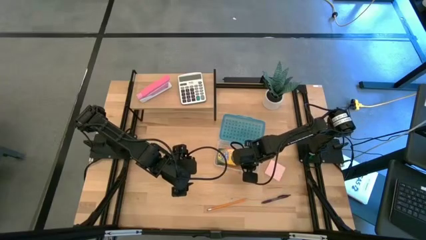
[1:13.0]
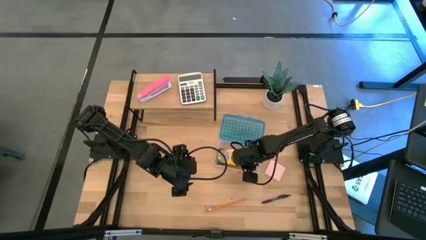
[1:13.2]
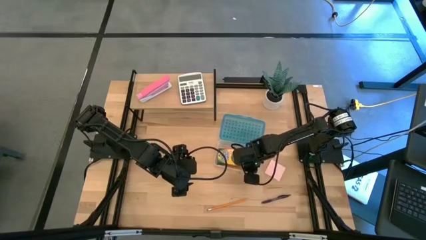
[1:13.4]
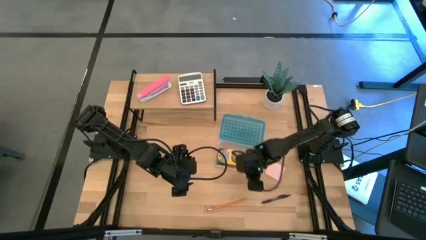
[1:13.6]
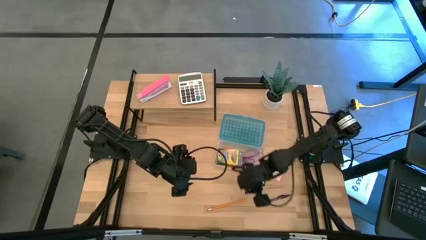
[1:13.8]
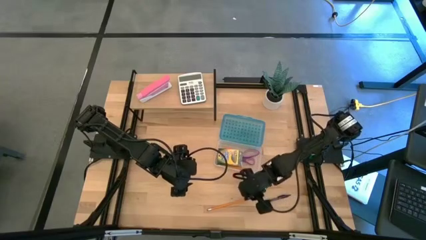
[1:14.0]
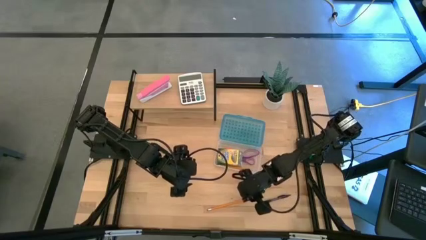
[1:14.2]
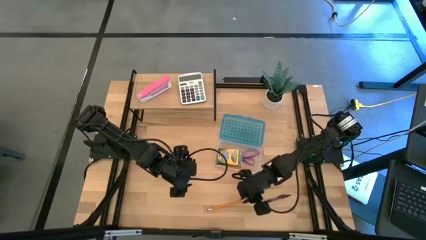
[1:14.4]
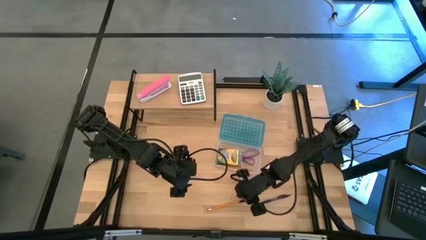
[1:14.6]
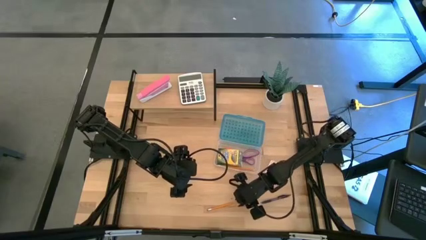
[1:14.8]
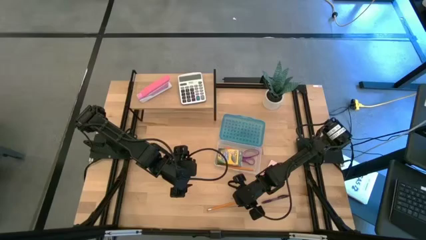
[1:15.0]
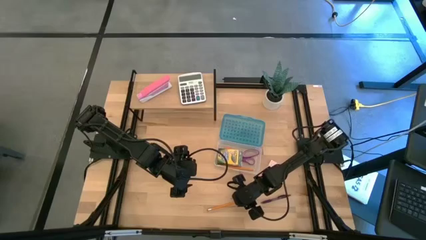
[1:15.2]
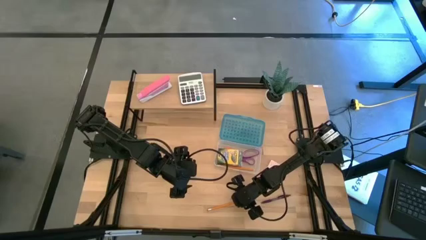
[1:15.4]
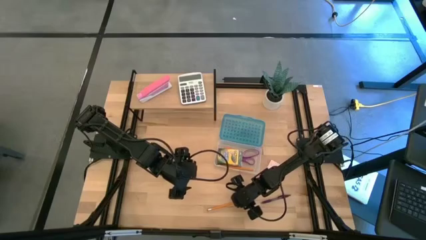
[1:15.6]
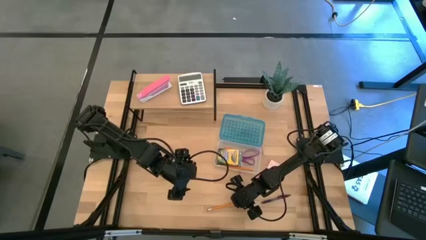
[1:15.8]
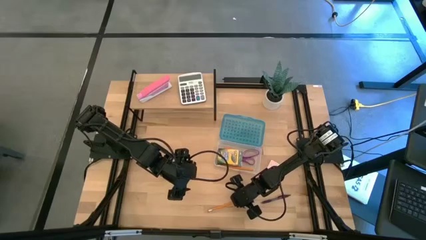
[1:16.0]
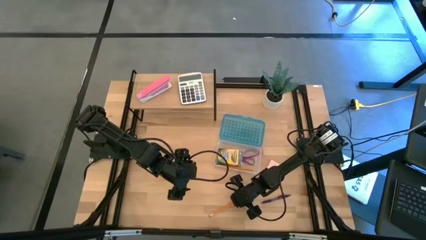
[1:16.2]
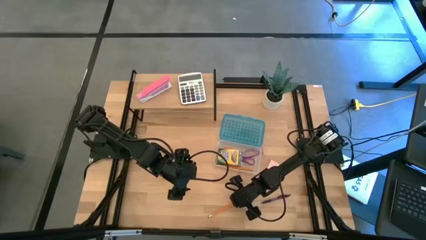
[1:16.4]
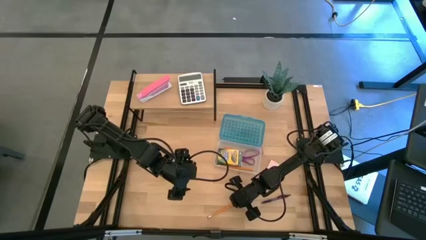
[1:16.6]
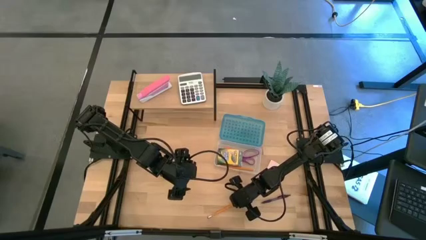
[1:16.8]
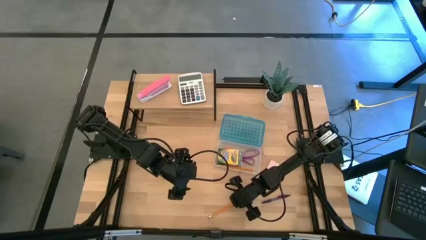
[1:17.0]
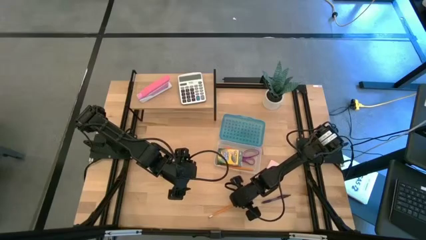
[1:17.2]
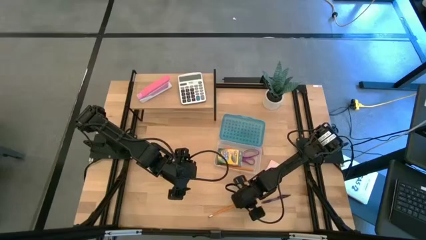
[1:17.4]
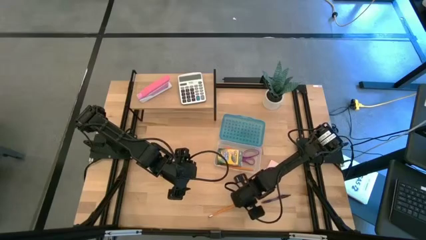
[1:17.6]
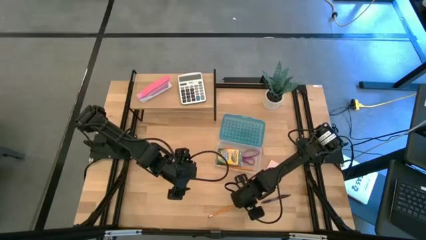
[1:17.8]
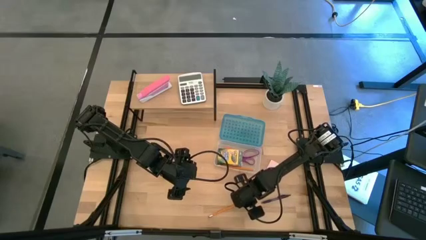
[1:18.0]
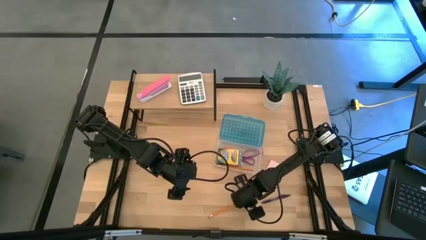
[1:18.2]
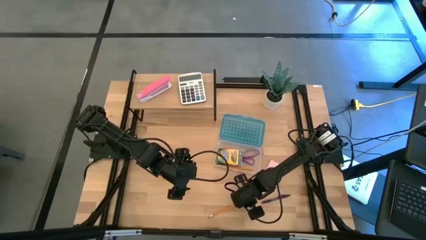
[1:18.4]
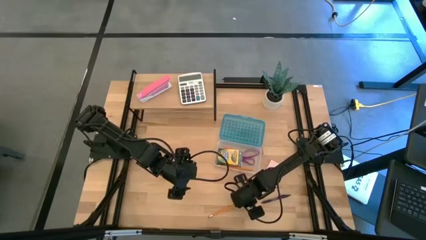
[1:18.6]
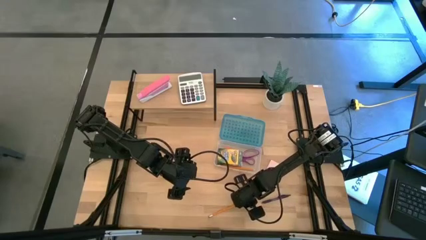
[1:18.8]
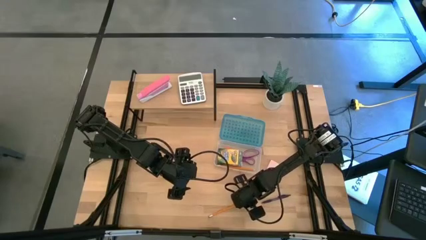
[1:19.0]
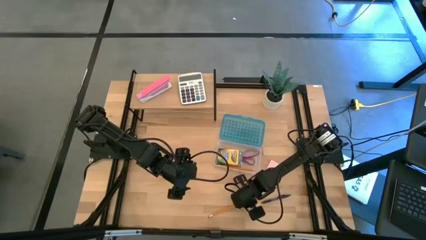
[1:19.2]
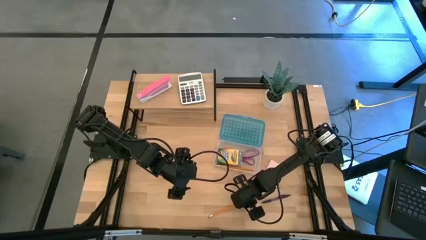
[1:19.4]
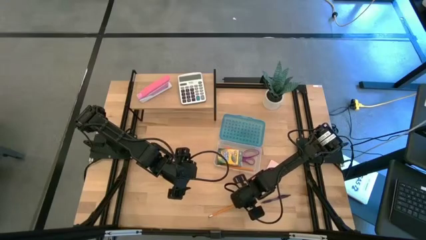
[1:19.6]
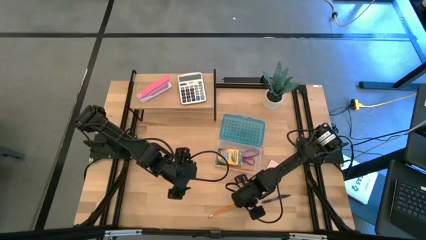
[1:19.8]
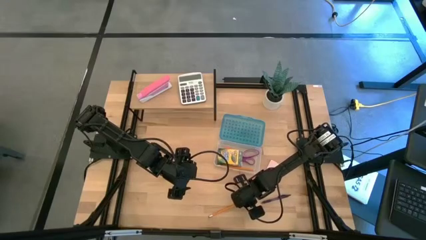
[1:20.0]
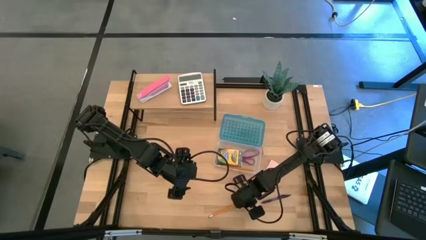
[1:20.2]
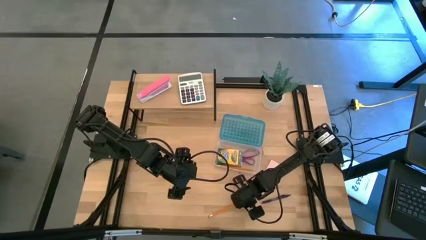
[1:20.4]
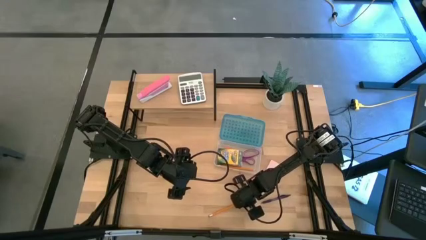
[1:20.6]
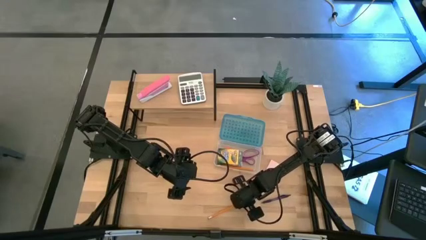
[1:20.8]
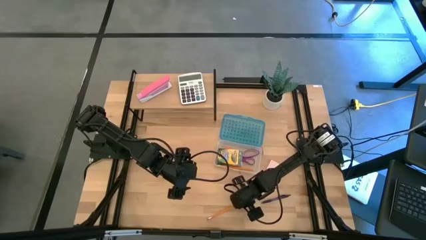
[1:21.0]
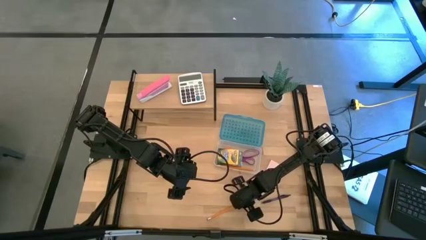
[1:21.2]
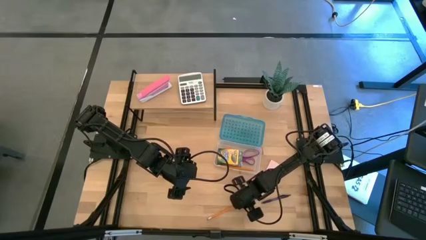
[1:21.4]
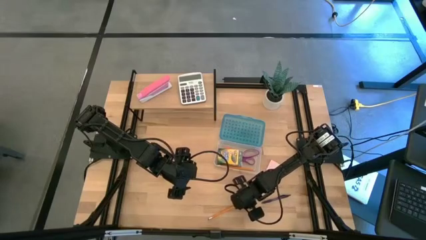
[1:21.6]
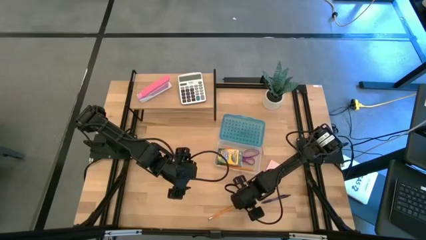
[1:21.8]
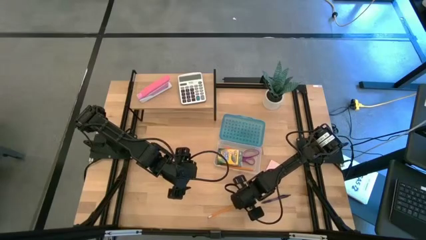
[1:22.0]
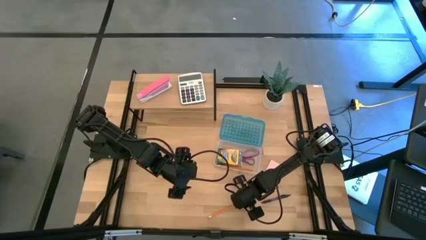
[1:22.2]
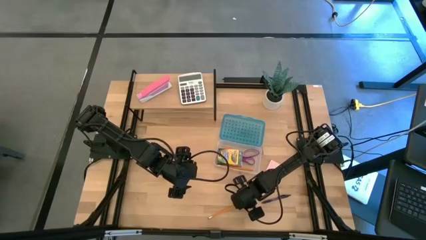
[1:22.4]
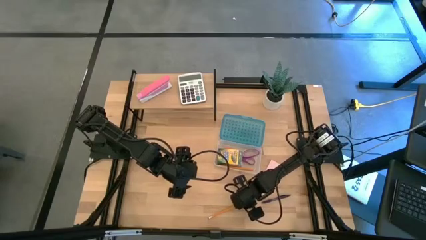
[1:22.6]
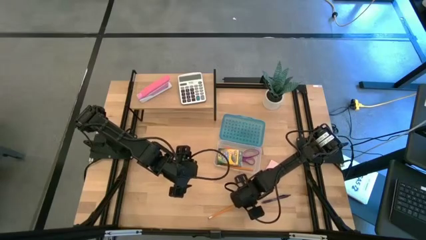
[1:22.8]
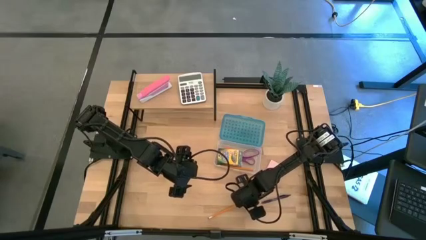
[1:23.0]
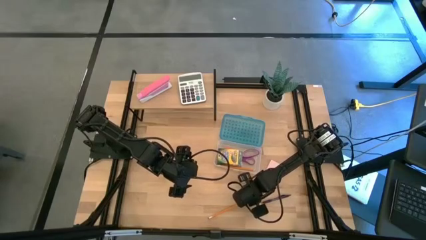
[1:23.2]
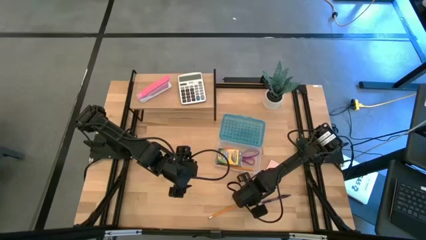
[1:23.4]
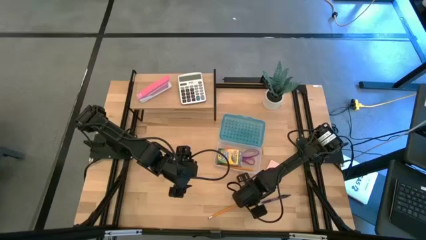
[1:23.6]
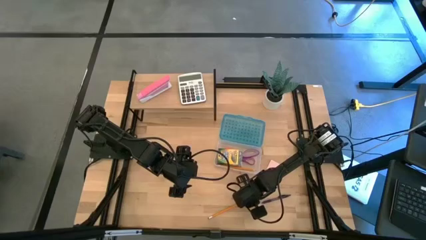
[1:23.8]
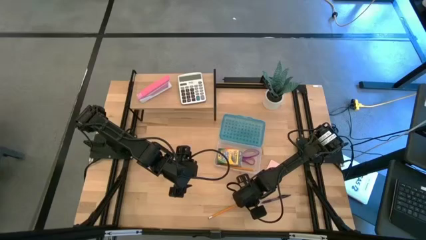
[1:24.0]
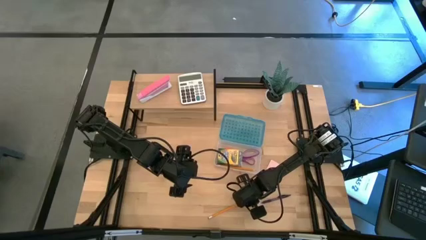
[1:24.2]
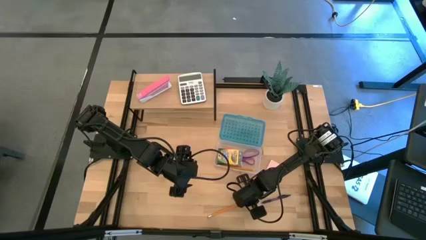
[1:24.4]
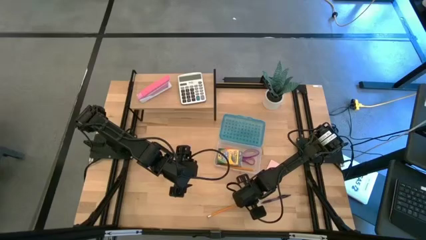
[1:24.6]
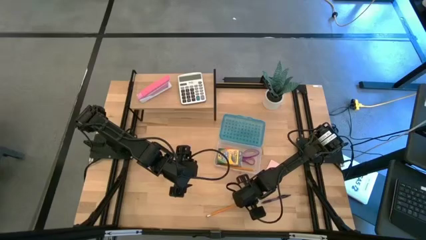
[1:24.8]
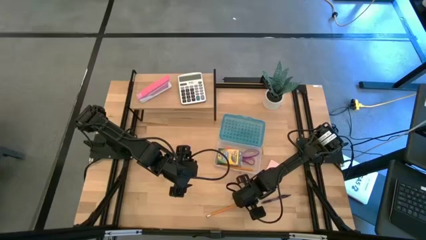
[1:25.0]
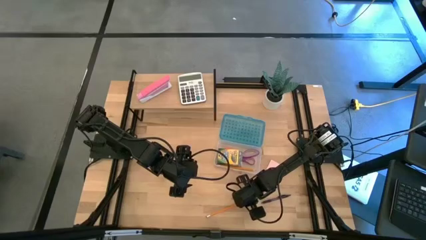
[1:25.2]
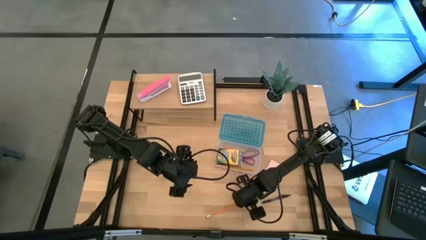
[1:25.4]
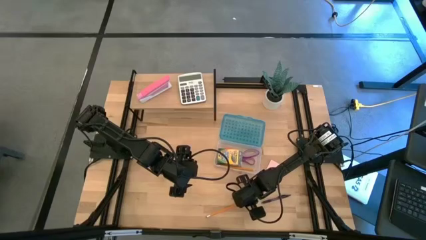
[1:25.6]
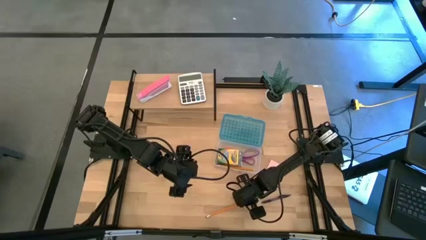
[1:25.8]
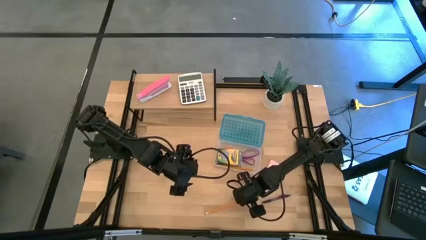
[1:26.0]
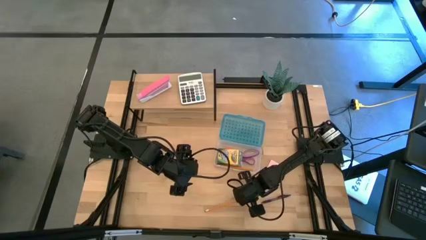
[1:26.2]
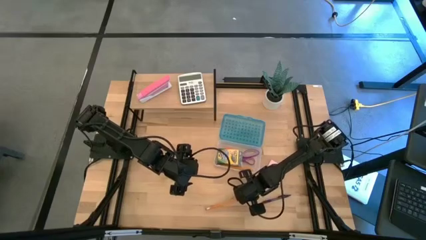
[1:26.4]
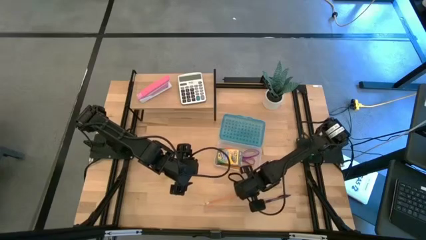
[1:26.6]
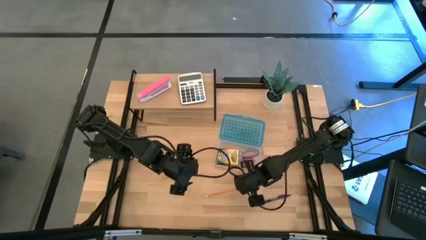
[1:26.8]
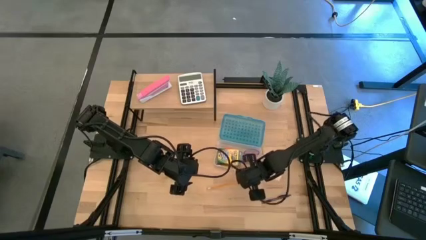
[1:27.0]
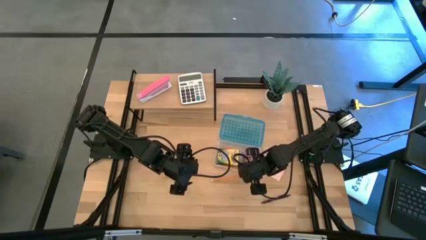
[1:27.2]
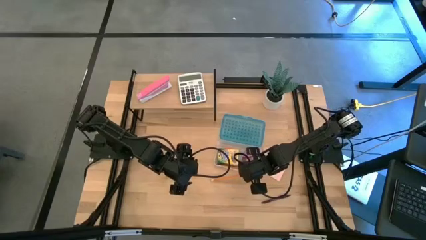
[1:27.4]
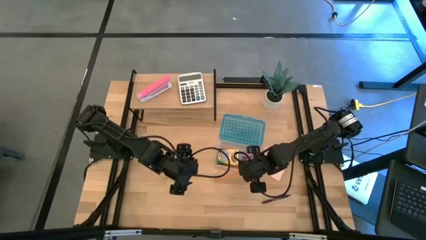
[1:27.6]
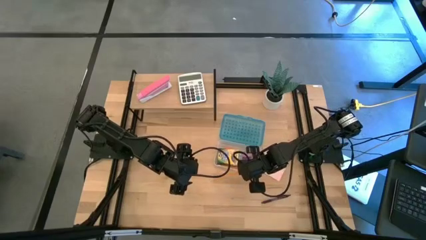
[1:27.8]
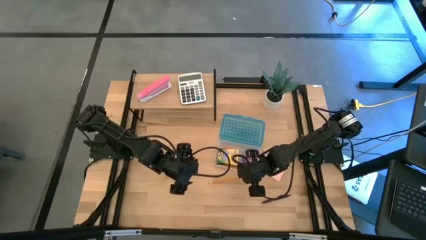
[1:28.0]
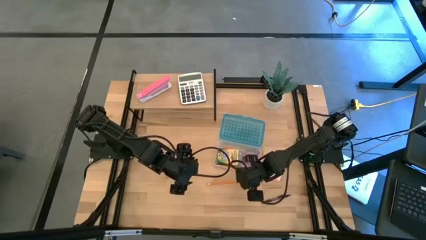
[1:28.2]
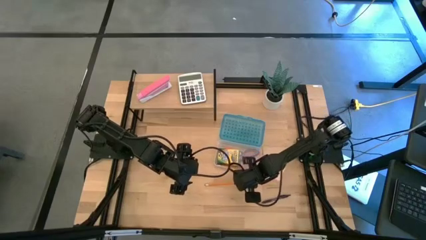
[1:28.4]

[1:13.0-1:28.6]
Task: Pack school essentials
Put the pencil into the supply box

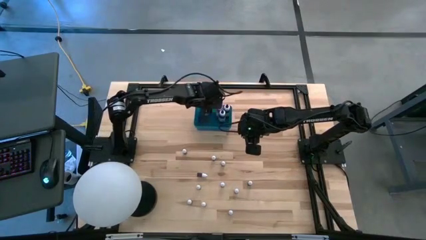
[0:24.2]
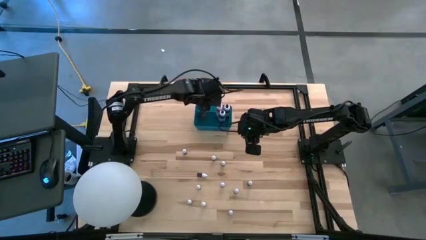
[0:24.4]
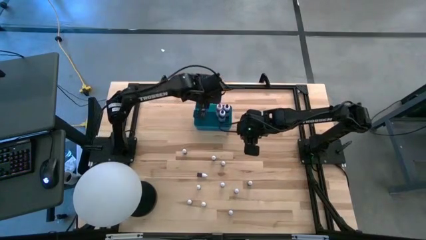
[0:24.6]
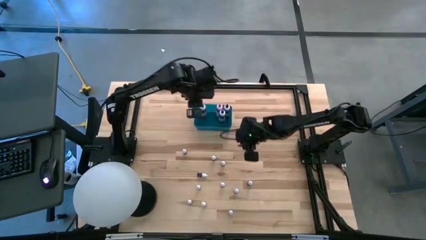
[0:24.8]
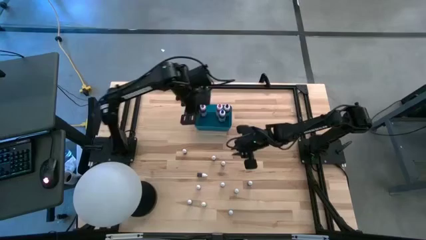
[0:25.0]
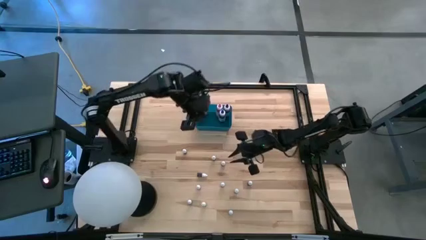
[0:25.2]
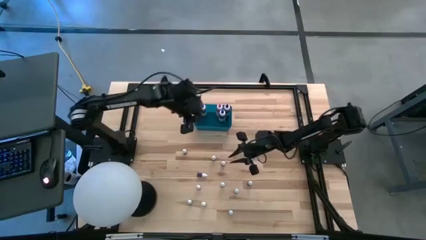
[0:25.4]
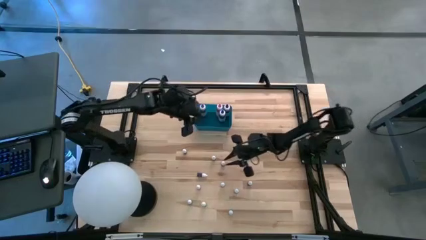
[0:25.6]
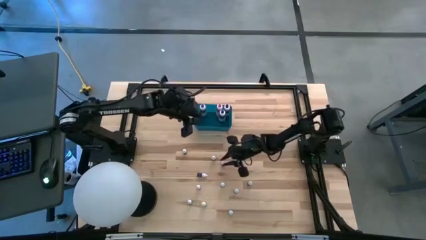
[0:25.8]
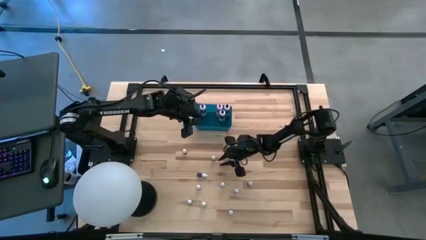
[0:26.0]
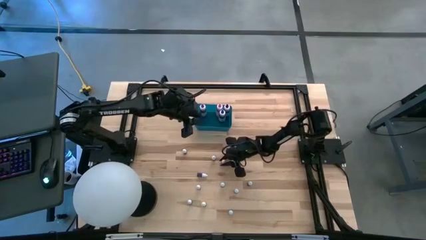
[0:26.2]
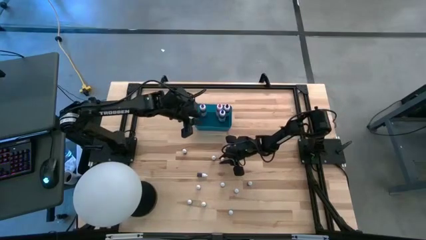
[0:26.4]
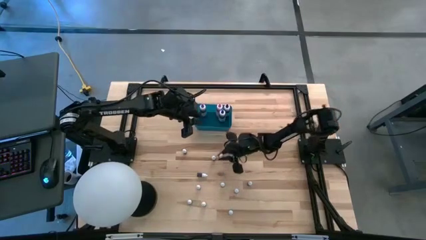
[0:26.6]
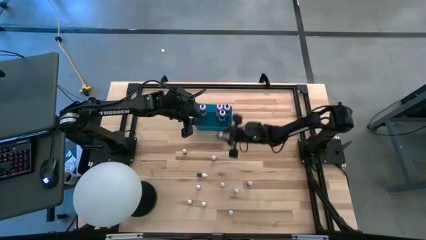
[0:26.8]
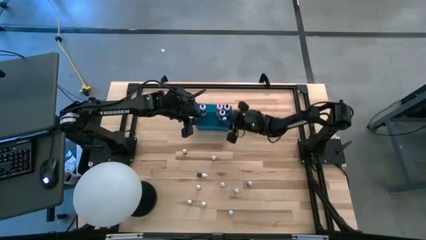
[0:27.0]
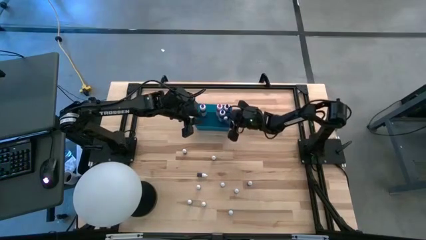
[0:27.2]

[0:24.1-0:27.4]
Task: Pick & Place food coloring
Put the purple food coloring bottle into the blue bin
